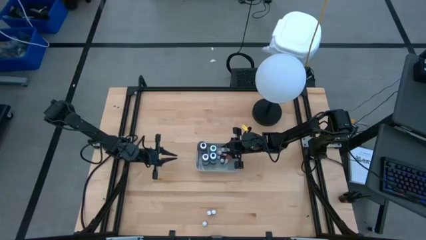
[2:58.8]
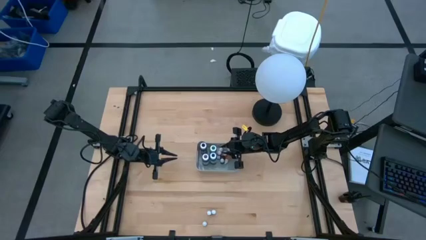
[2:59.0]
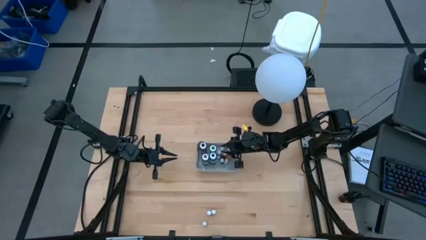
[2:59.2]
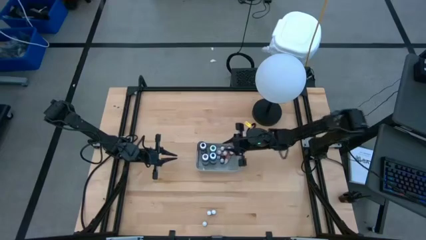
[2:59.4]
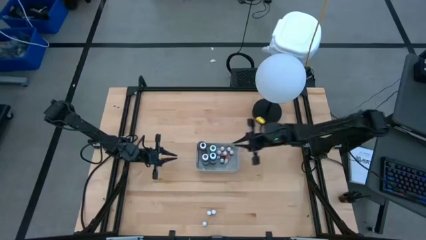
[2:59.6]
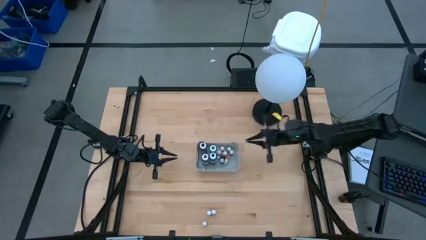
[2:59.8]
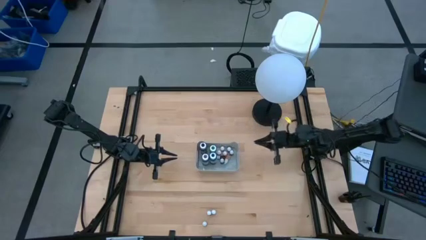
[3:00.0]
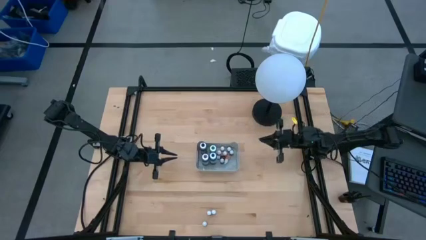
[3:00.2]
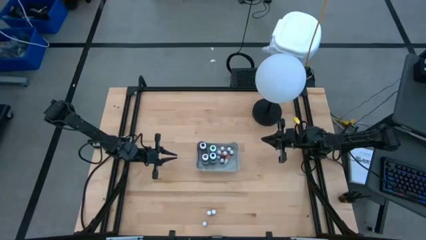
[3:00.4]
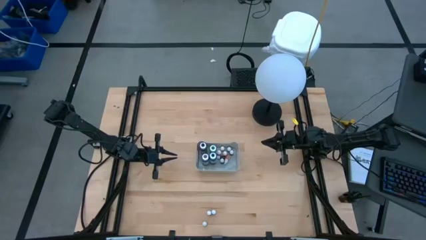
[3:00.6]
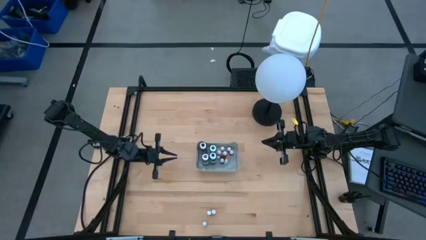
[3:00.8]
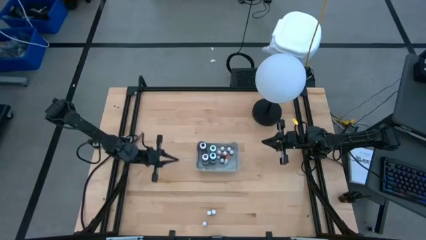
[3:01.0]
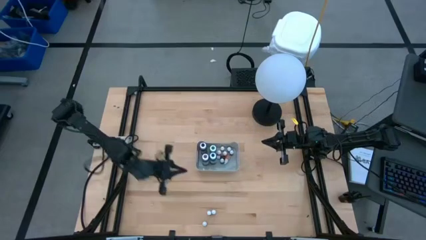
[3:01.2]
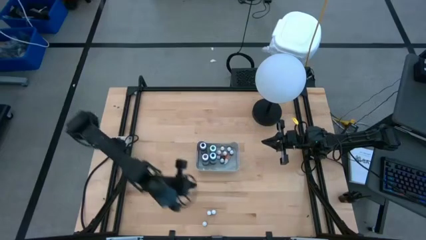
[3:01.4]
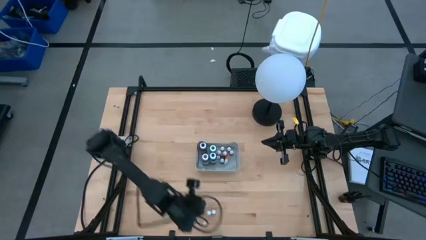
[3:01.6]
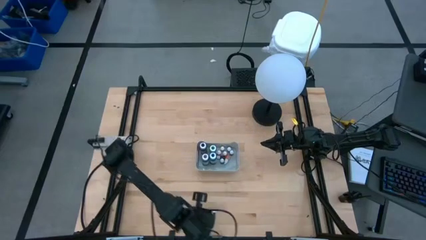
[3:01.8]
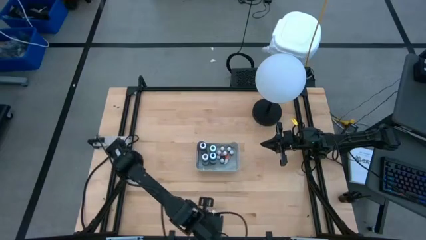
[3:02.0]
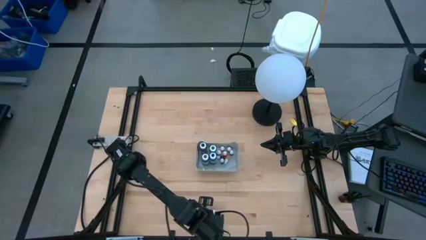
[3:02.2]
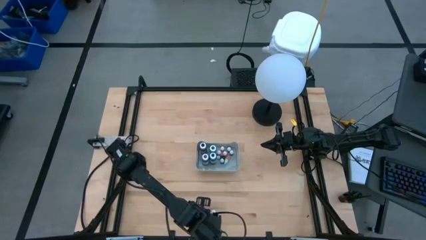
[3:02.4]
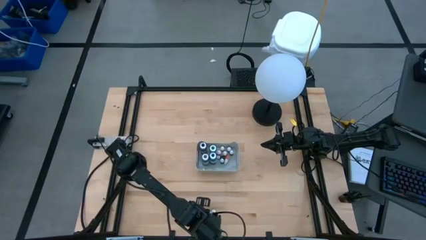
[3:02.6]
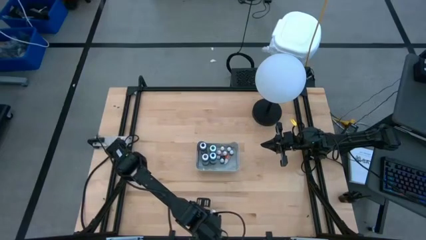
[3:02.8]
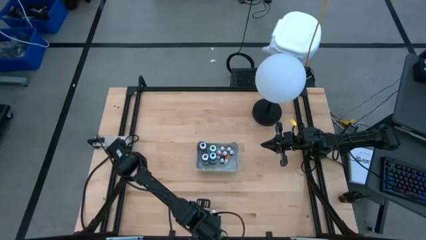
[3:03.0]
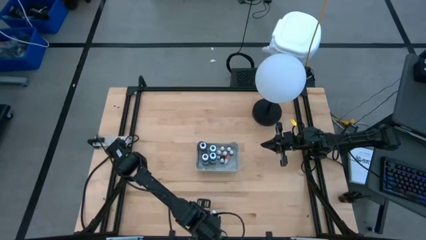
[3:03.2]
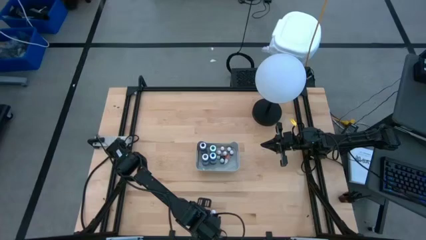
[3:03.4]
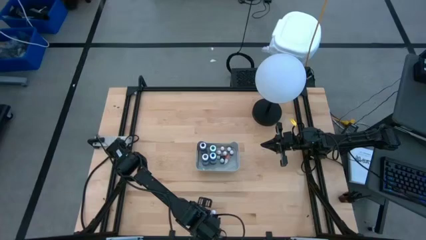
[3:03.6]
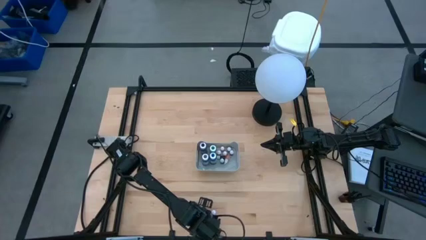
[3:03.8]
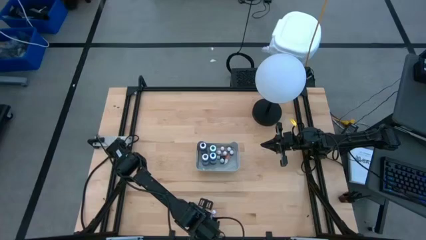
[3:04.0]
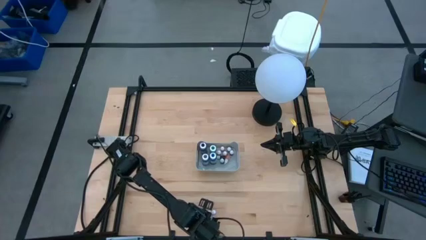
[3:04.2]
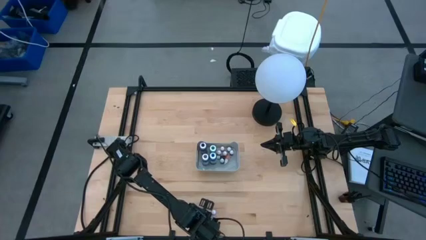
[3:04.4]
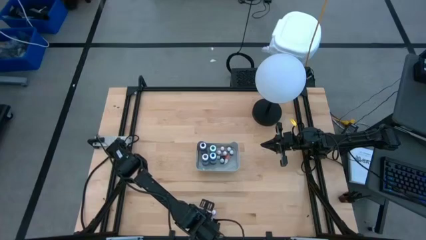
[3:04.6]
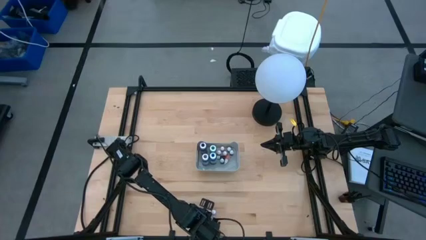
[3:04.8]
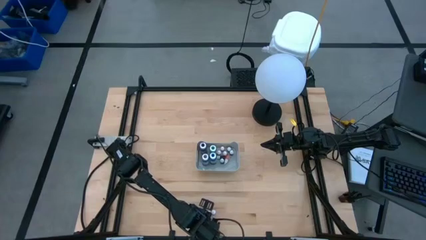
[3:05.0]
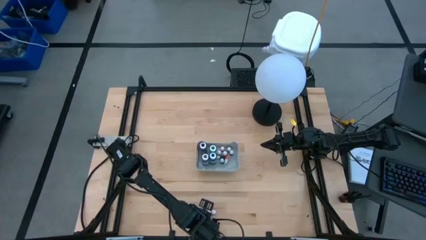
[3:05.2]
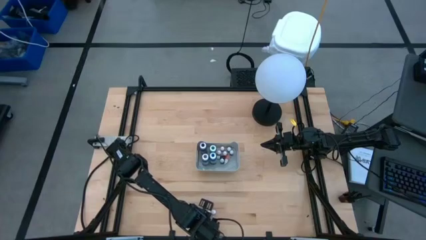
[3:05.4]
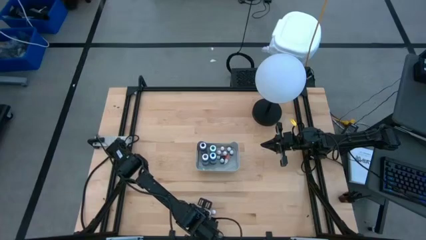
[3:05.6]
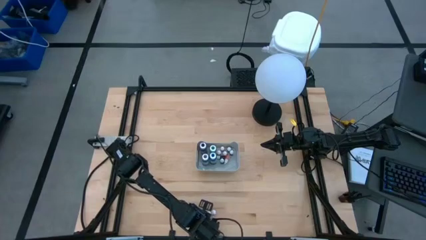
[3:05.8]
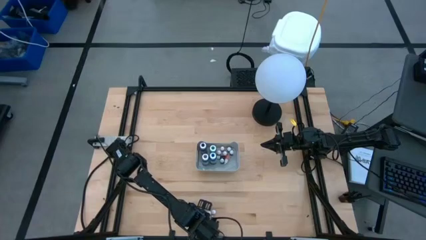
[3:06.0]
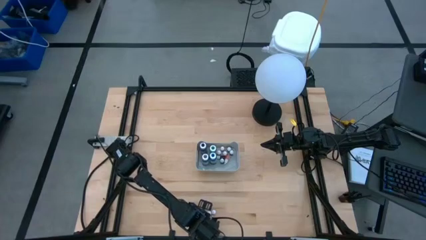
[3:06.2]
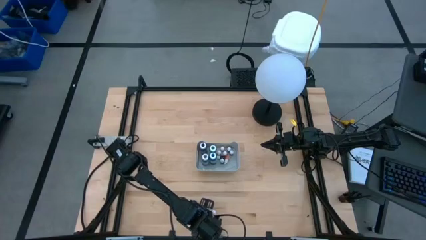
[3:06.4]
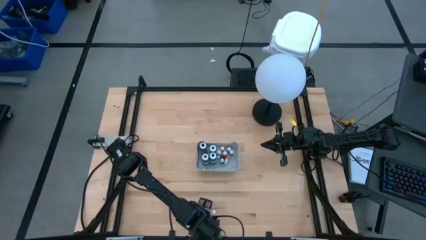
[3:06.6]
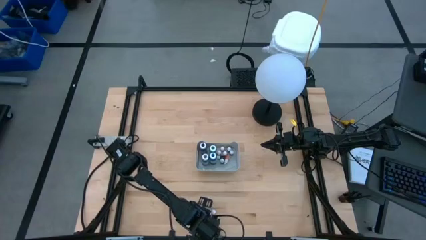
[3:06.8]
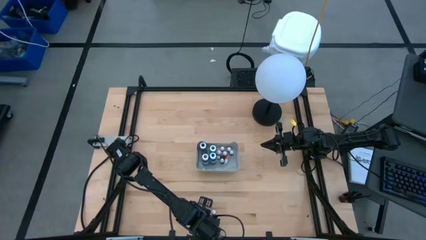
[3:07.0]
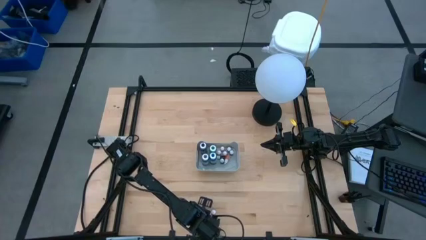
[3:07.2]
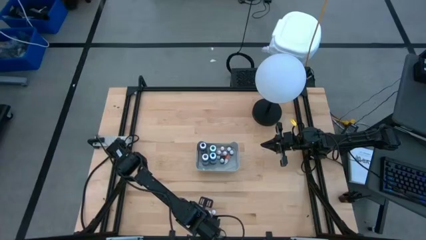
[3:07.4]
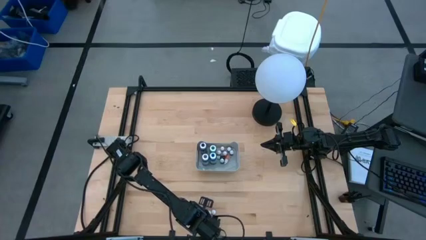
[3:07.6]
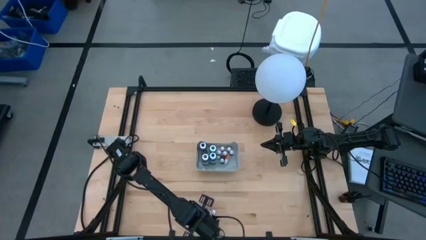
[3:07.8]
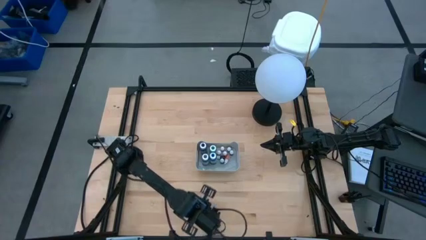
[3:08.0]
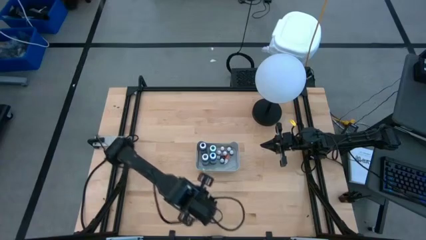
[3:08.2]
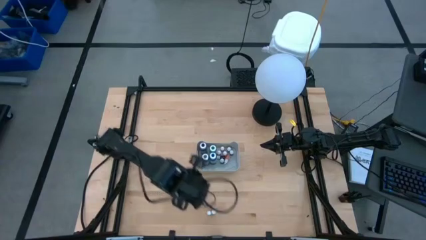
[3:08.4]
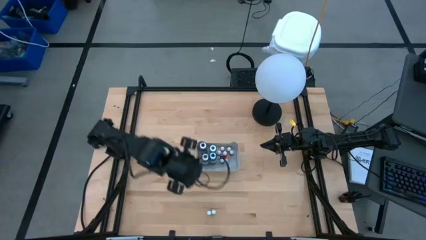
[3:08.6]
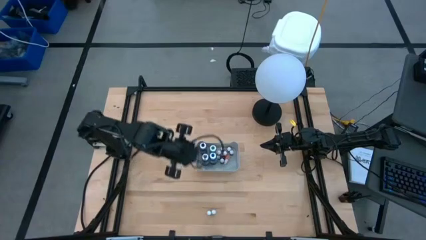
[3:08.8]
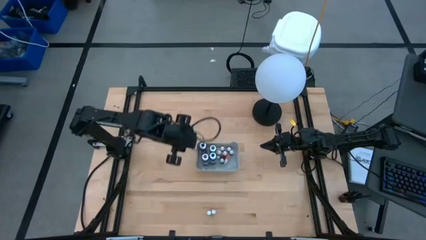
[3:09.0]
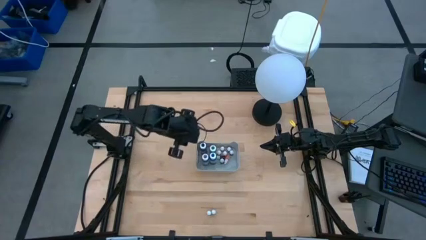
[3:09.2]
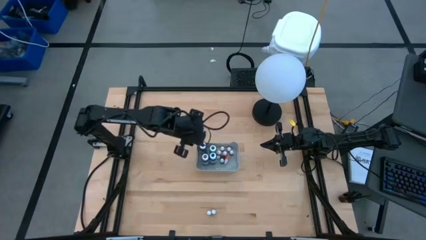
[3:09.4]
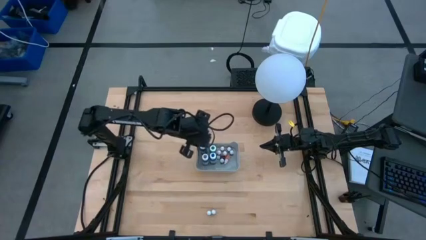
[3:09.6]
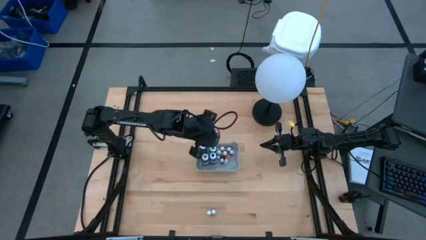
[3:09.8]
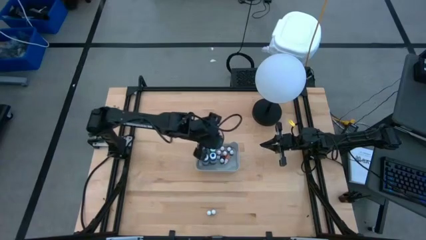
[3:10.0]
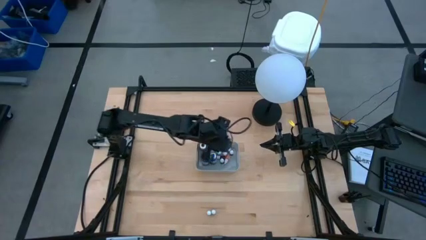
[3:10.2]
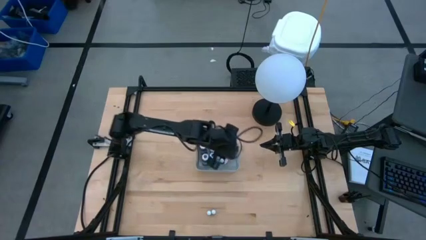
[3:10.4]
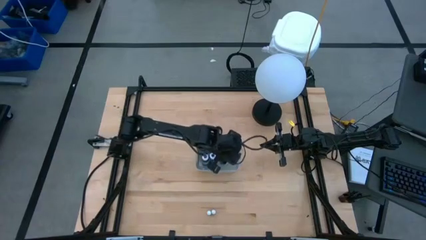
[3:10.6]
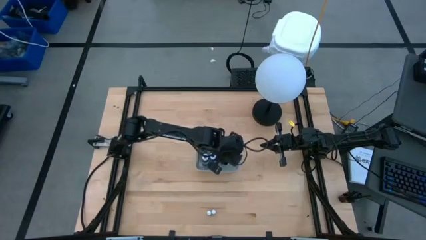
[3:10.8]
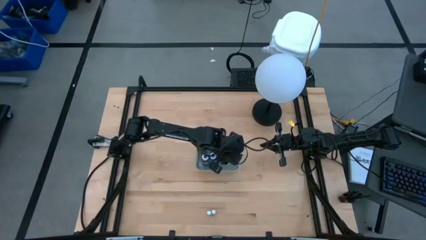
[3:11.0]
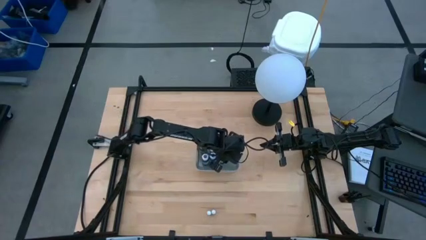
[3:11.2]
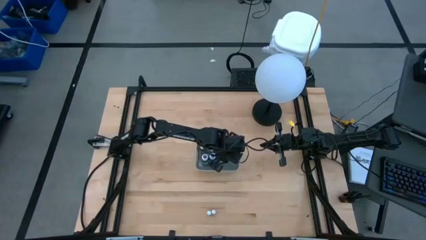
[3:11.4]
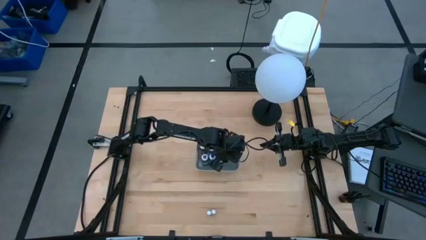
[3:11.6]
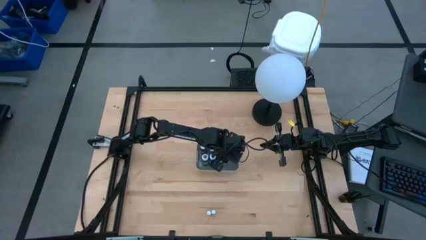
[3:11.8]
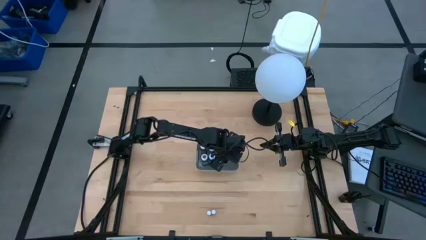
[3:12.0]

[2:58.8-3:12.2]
Task: Pick & Place food coloring
Put the small green food coloring bottle into the gray bin

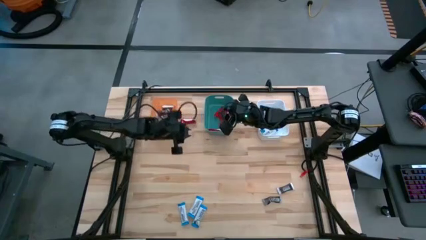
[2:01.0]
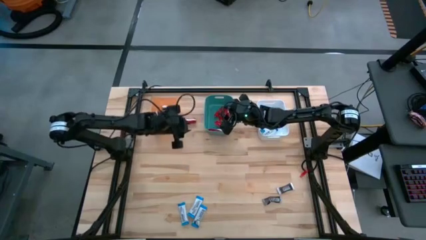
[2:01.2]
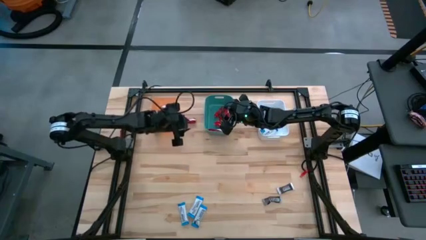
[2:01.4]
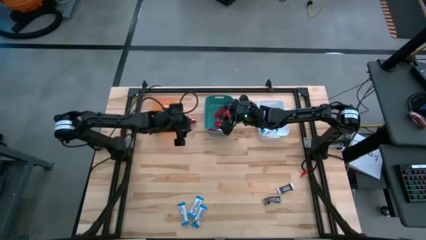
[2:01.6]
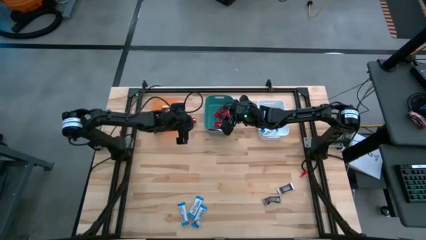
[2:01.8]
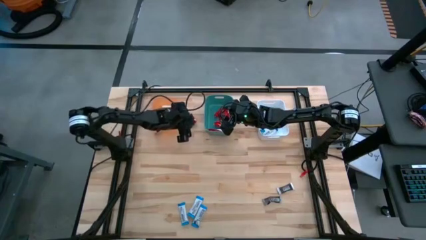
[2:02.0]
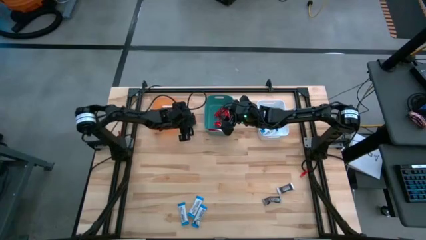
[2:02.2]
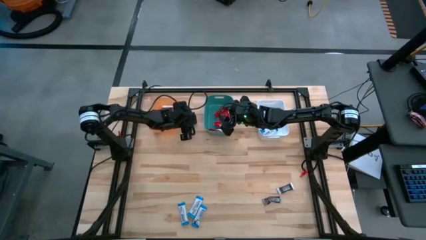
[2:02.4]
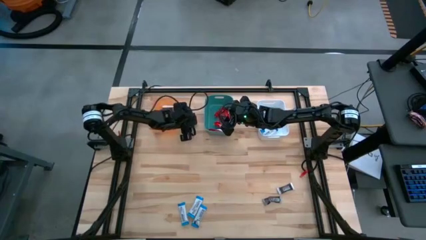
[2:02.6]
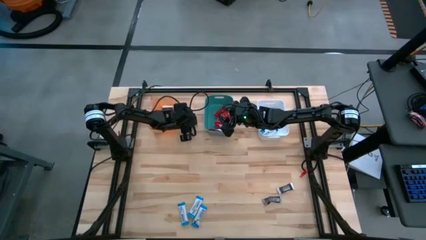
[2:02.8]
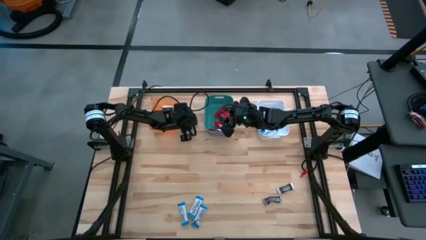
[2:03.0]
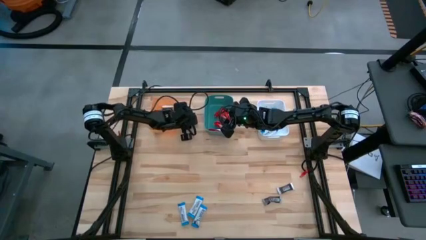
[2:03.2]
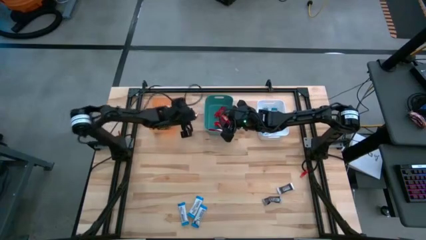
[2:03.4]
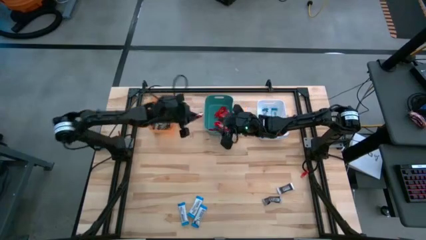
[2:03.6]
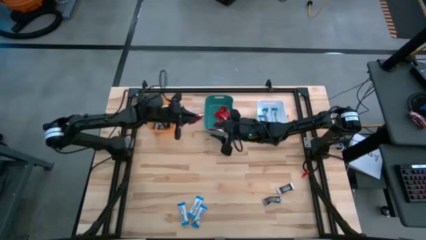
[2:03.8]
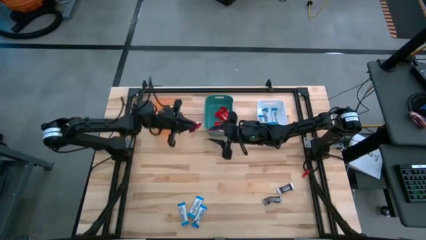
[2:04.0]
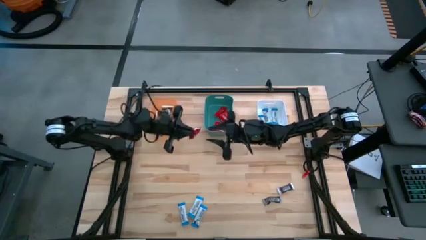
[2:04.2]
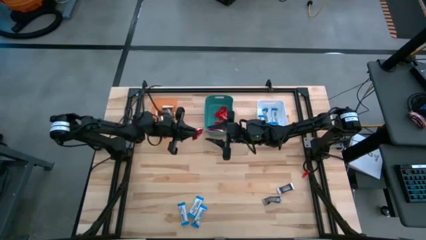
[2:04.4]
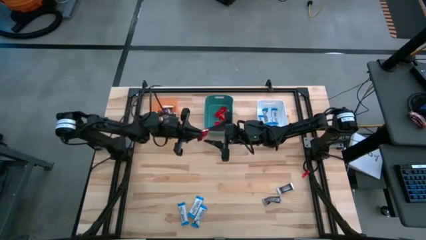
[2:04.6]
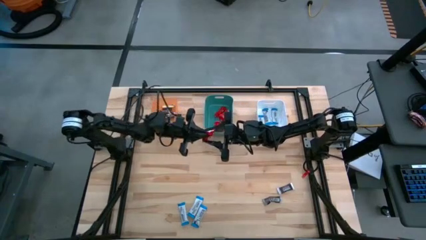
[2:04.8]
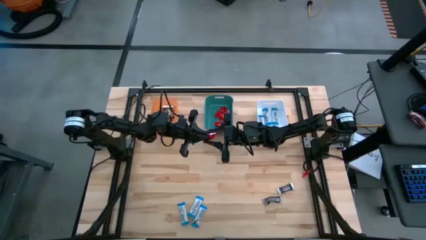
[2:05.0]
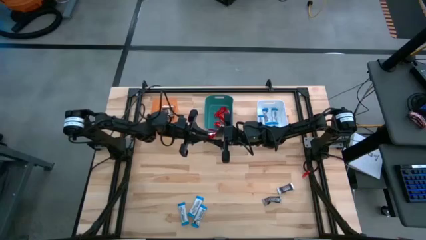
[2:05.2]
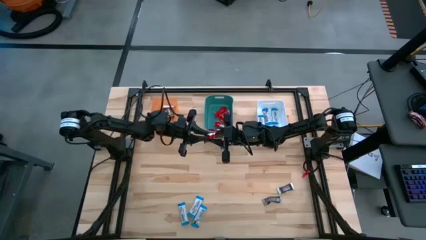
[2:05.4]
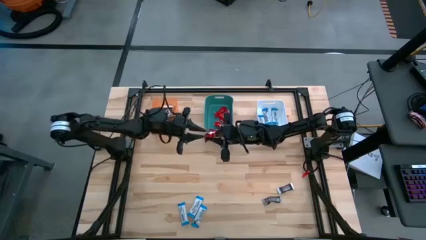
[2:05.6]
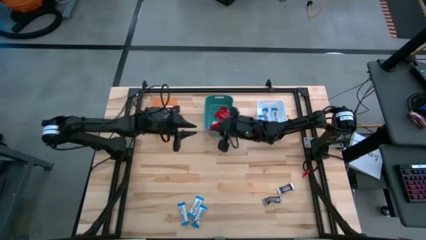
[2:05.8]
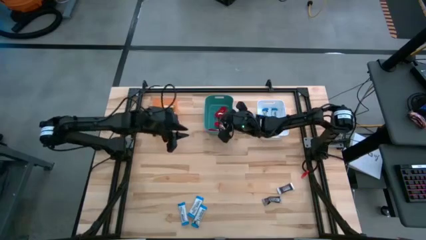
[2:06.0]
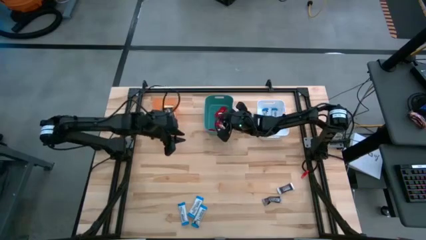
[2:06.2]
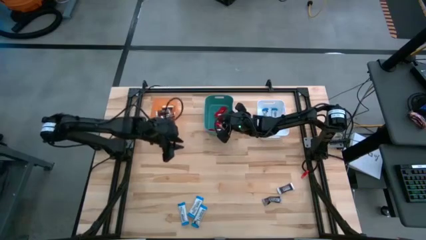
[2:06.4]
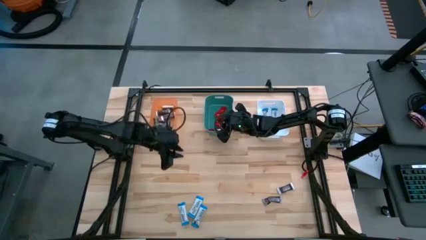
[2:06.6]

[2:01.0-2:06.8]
Task: Organize candy in baskets
Put the red chocolate bar into the green bin
